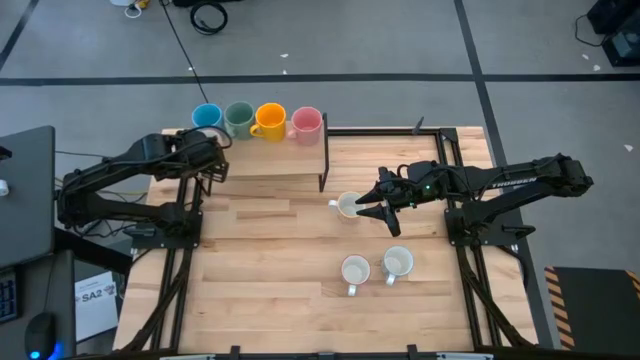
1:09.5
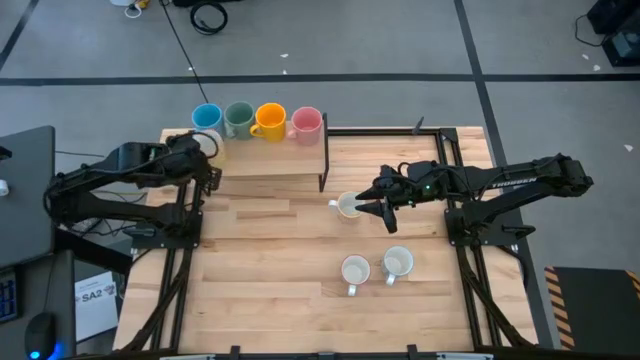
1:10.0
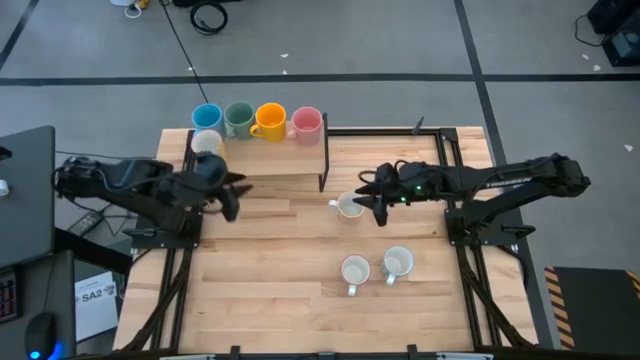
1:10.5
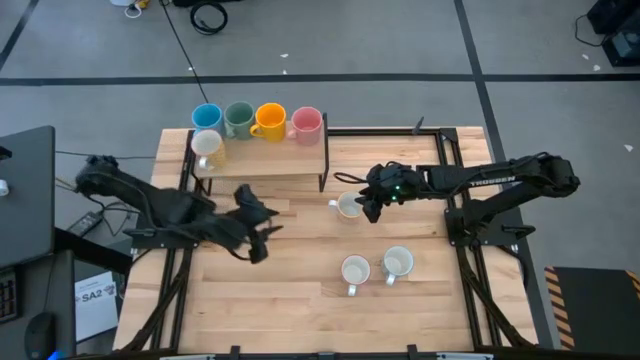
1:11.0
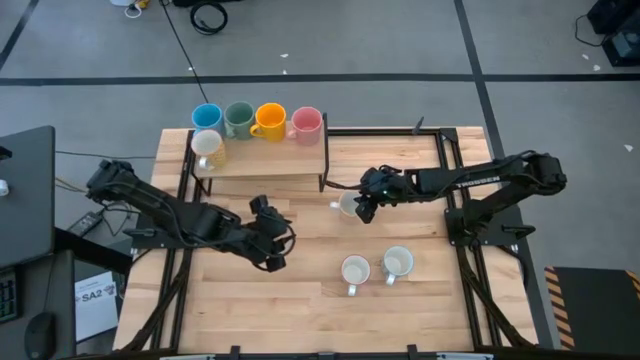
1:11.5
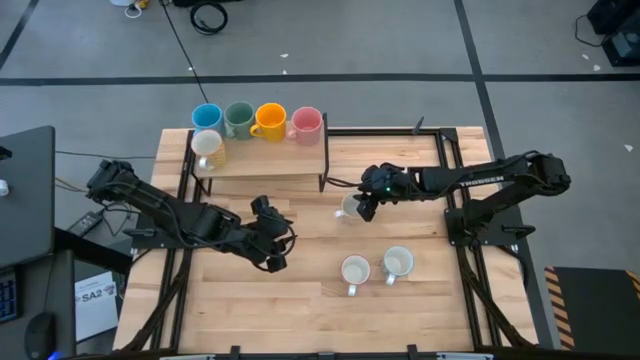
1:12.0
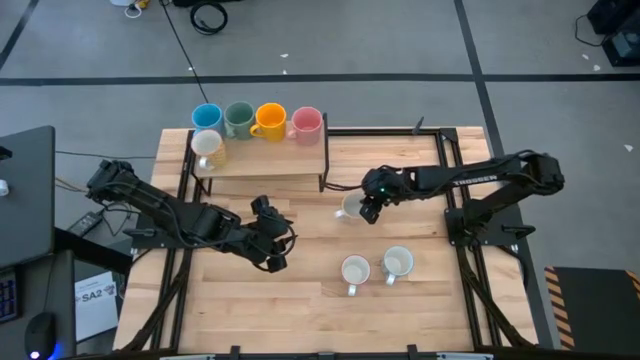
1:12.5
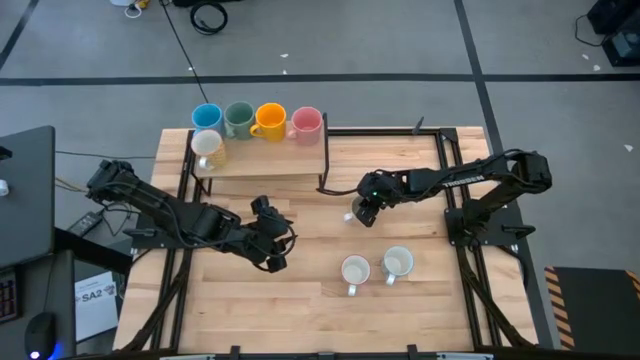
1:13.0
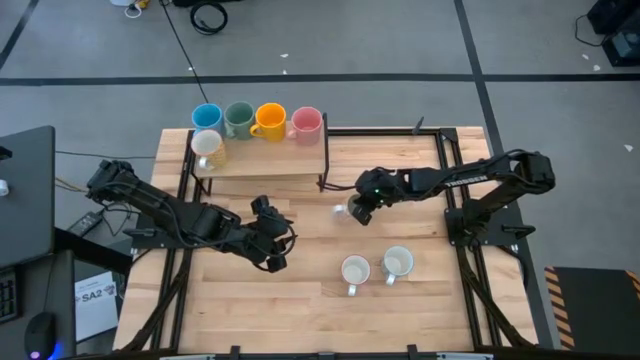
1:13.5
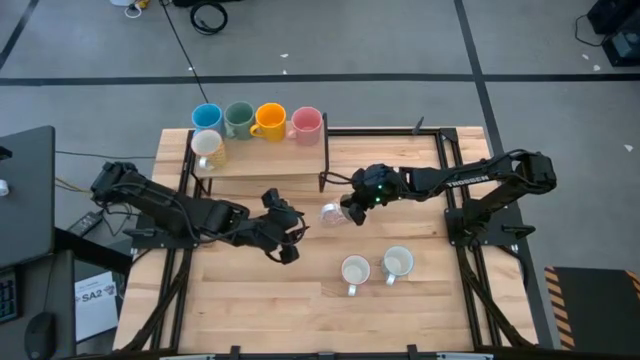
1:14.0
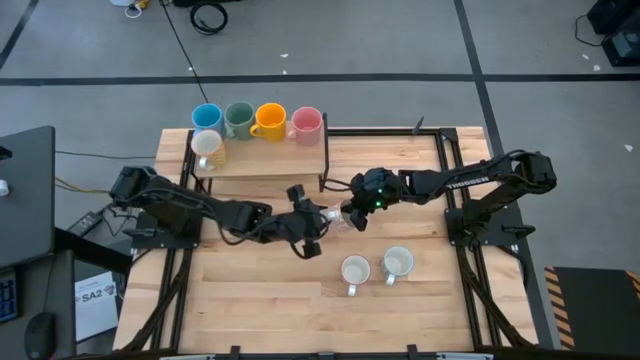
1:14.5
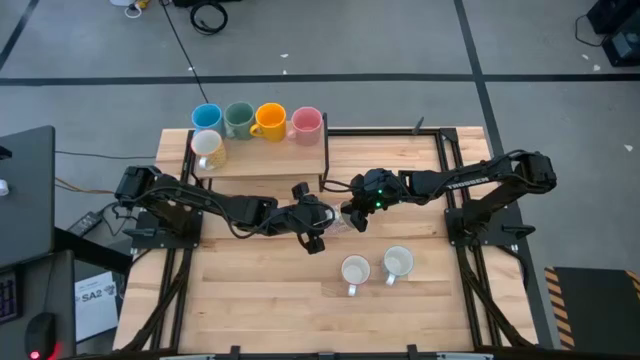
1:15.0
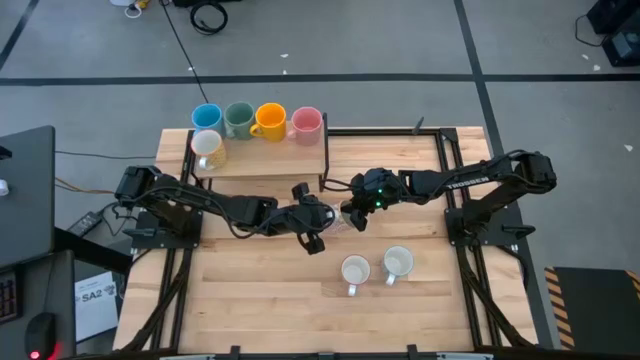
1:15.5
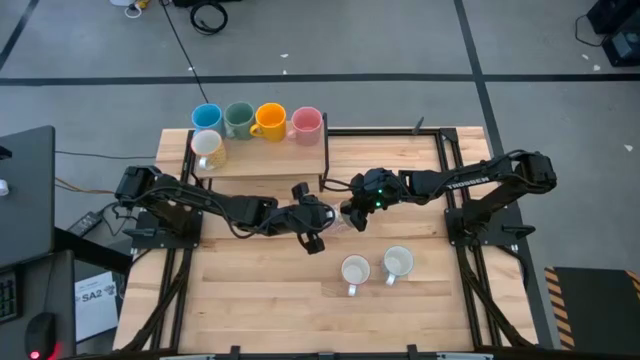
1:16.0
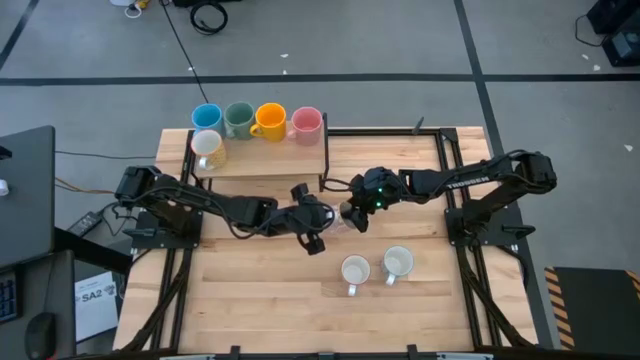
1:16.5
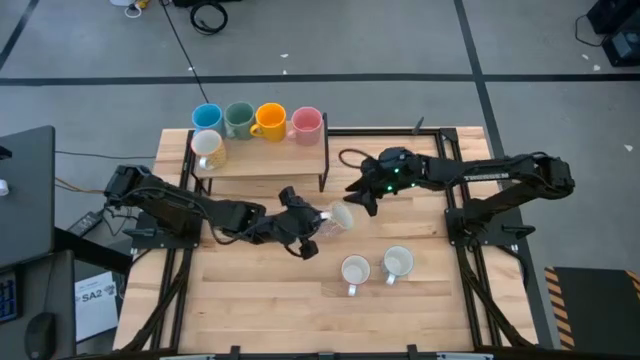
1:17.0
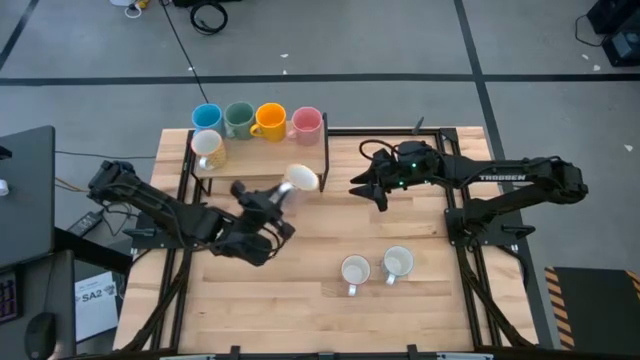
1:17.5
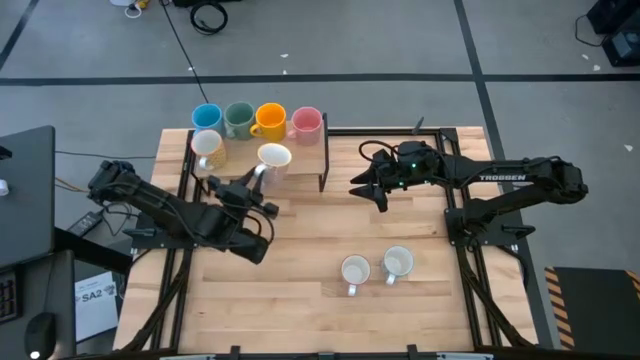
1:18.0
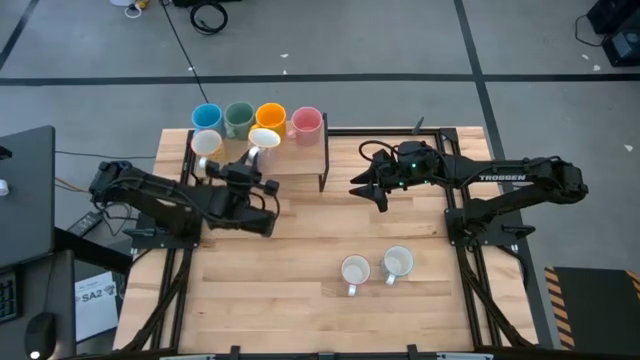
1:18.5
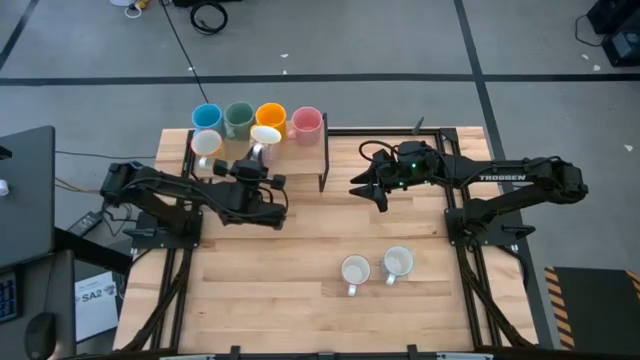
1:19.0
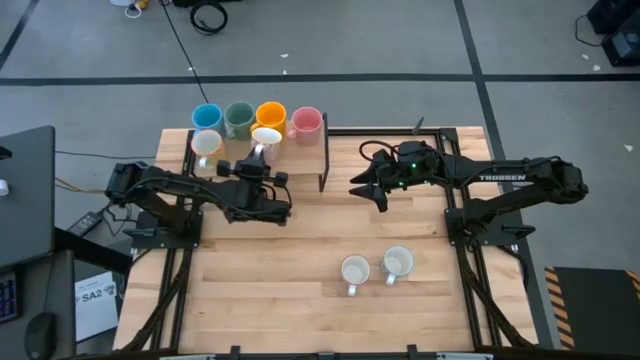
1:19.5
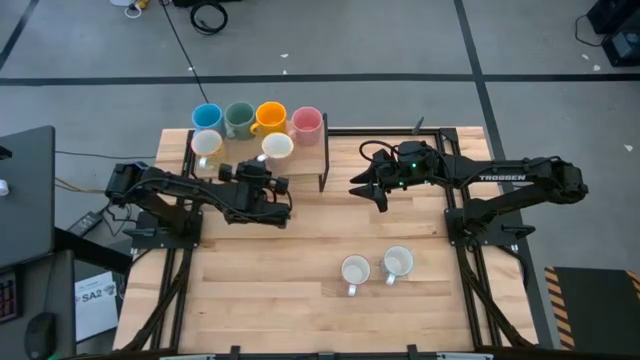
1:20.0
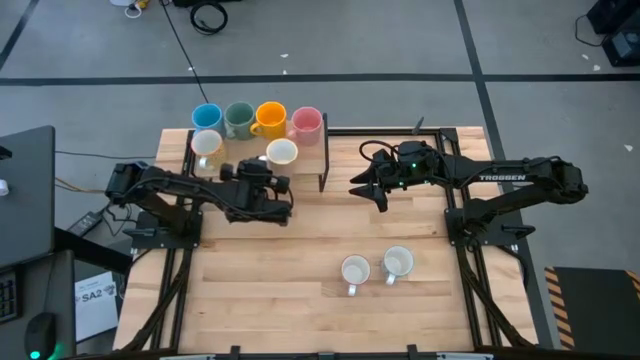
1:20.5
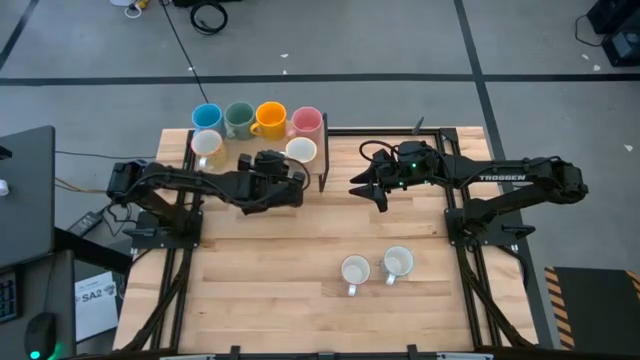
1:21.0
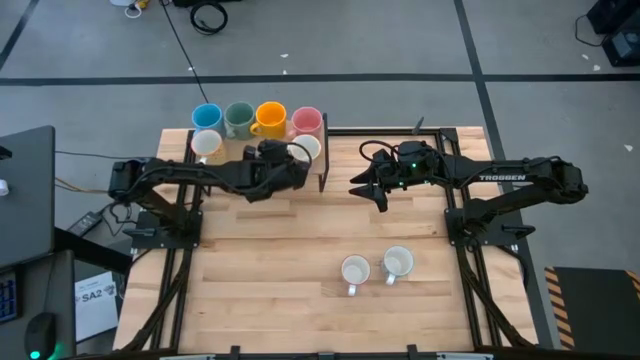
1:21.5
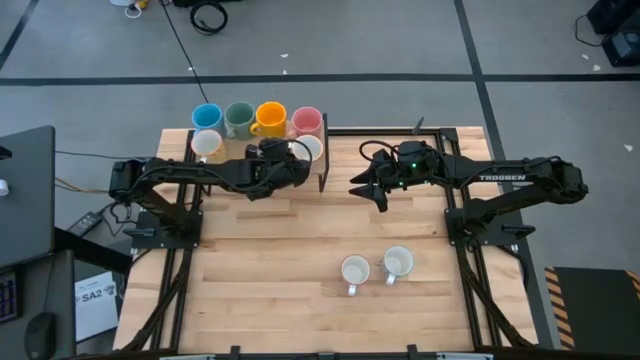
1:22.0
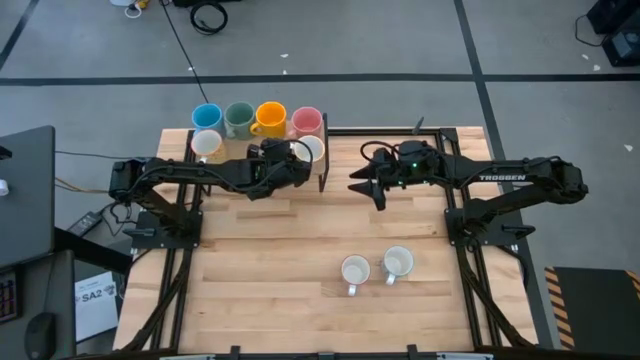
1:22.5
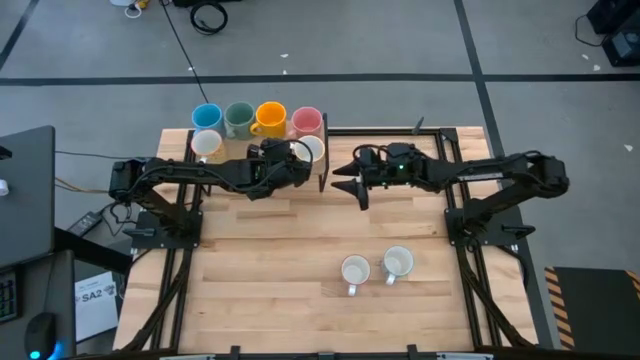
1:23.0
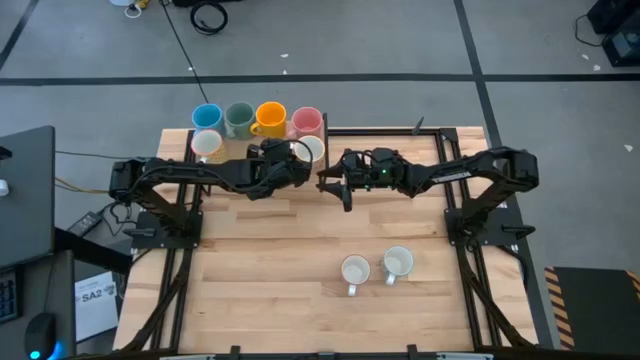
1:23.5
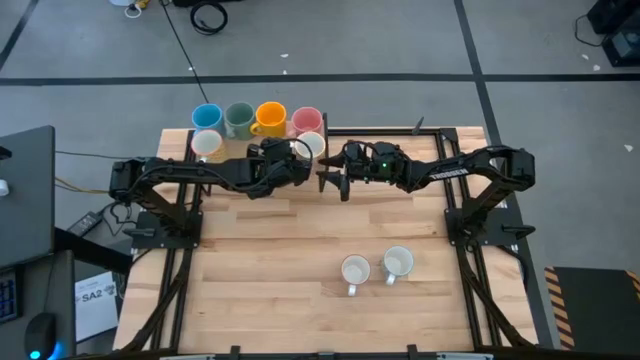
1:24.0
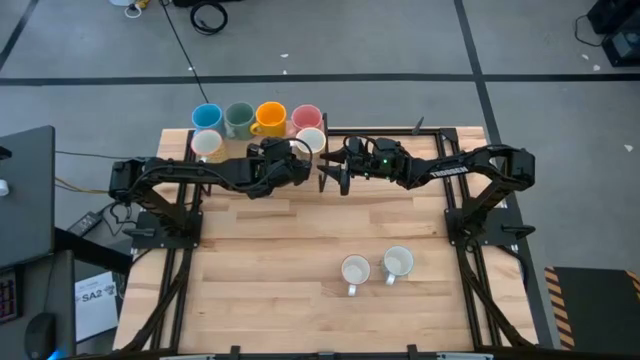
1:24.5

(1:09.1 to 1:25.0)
Task: Place coffee mugs
Put the orange patterned mug on the shelf

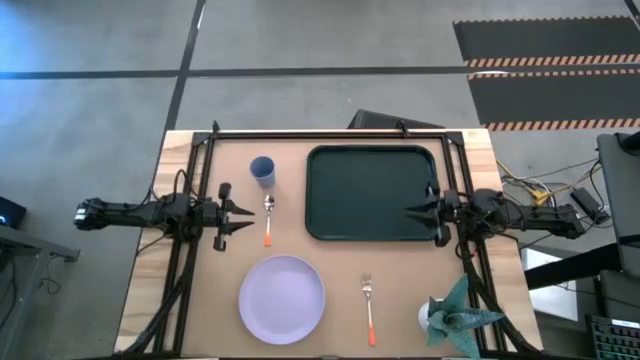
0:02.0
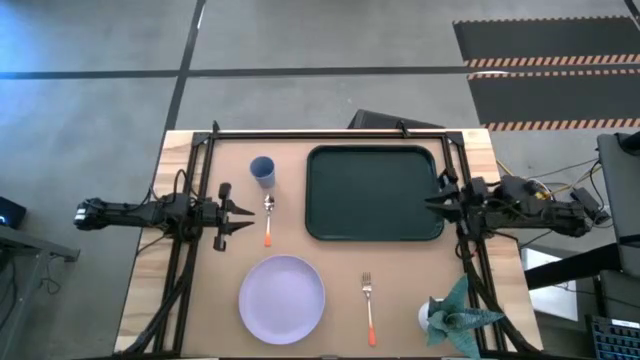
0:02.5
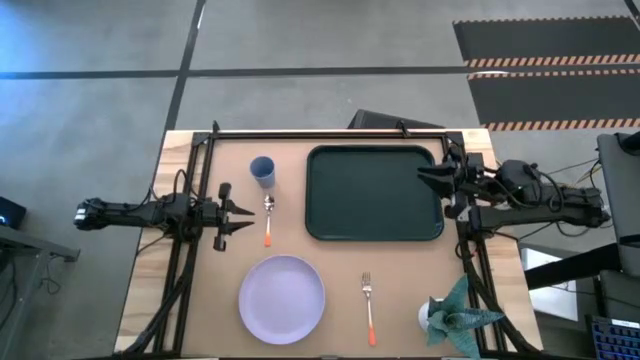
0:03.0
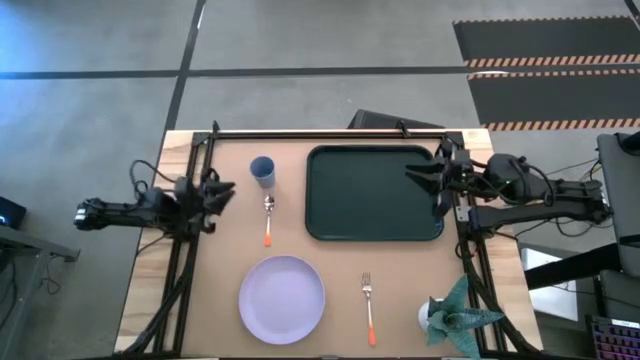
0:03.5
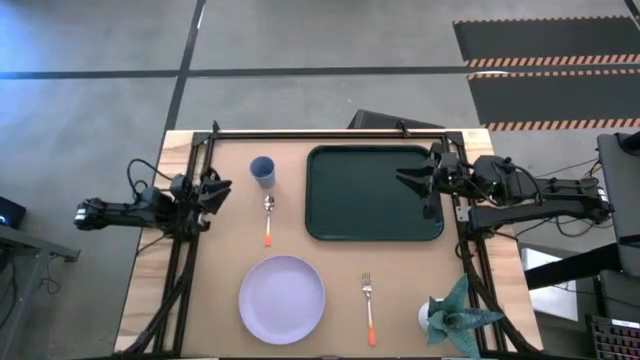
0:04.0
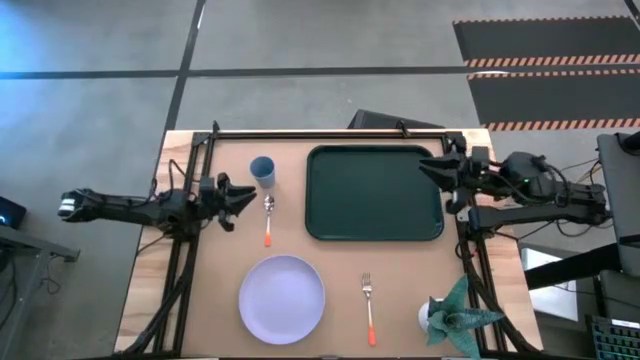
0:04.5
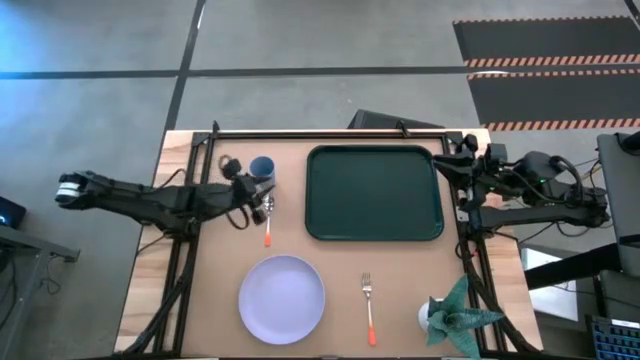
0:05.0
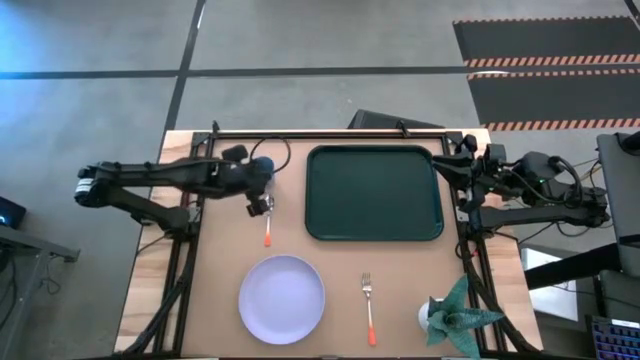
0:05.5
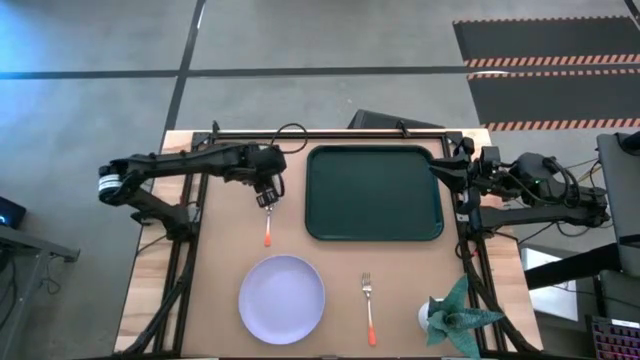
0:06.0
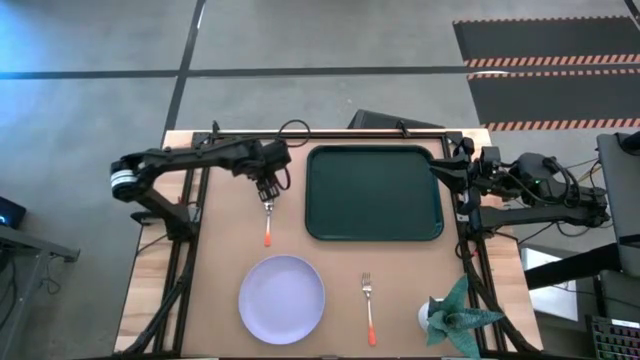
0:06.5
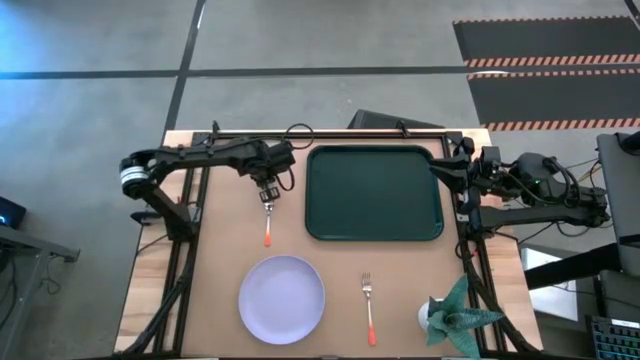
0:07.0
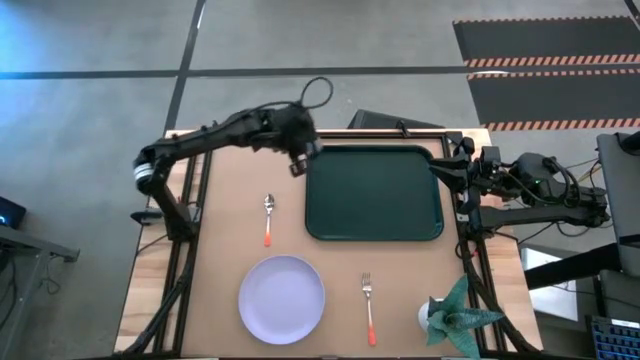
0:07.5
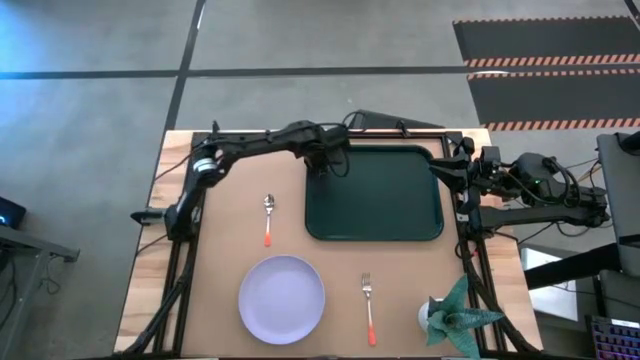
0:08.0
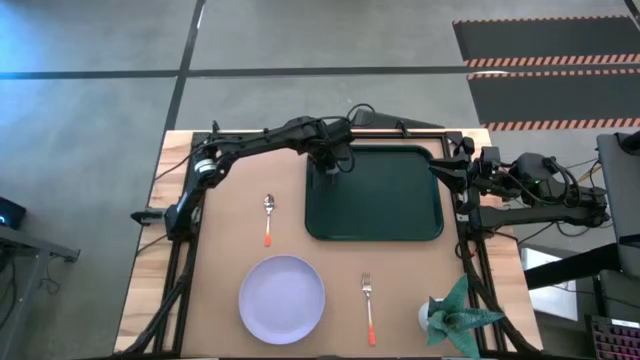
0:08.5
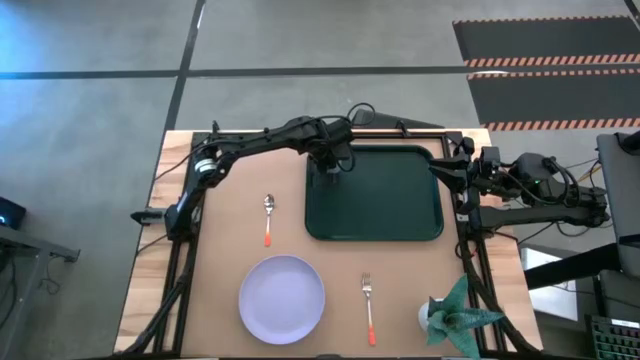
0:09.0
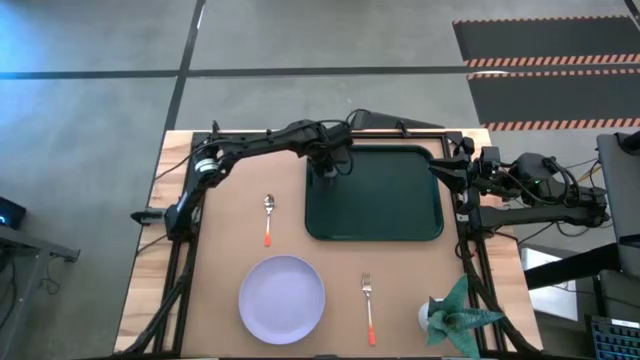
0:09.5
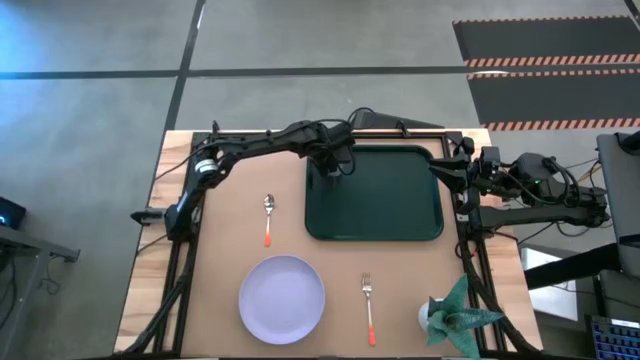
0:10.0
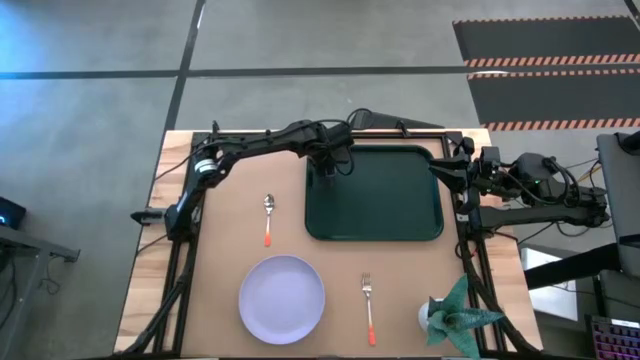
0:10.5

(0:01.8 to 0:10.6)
Task: Pick and place plate/cup/fork/spoon on tray
Put the blue cup on the black tray
